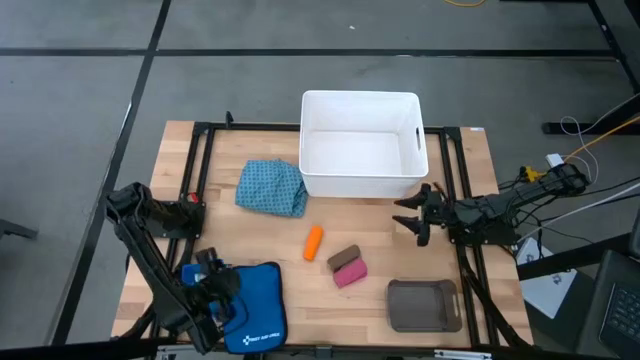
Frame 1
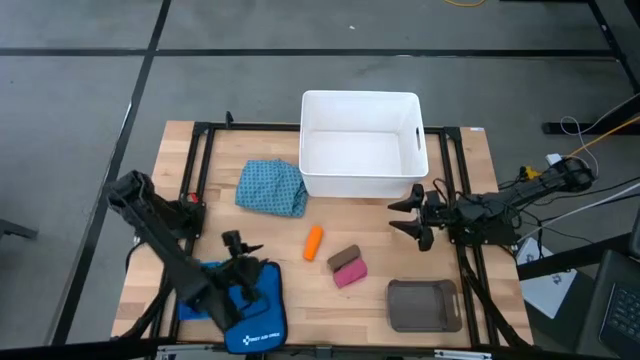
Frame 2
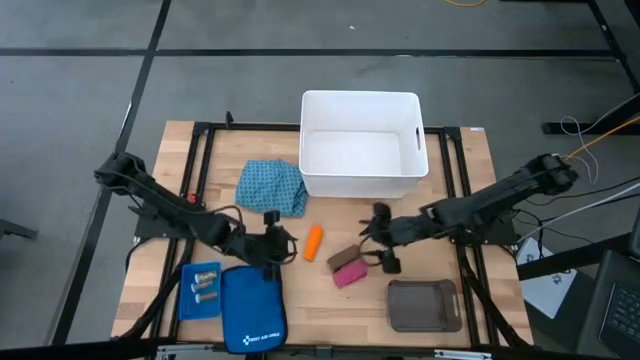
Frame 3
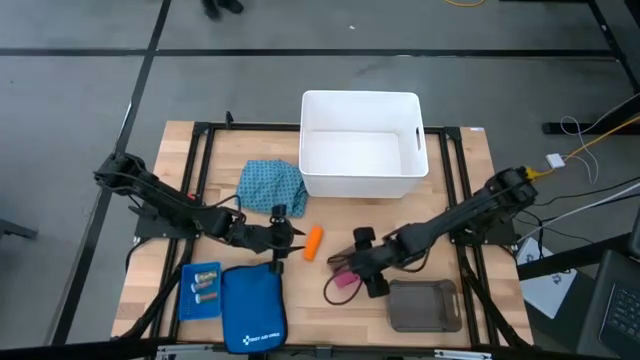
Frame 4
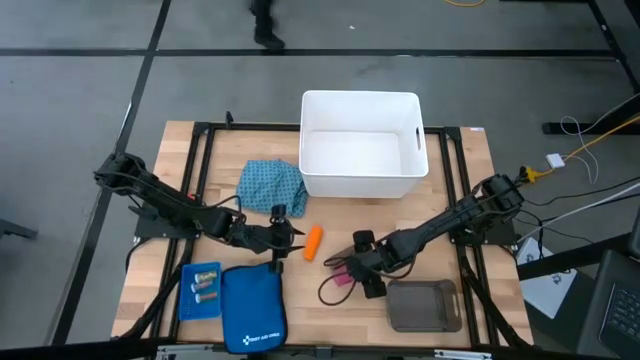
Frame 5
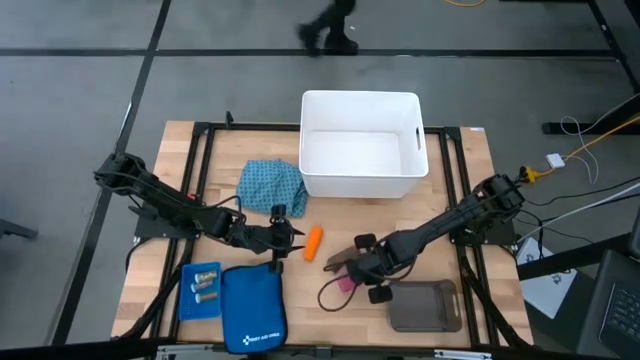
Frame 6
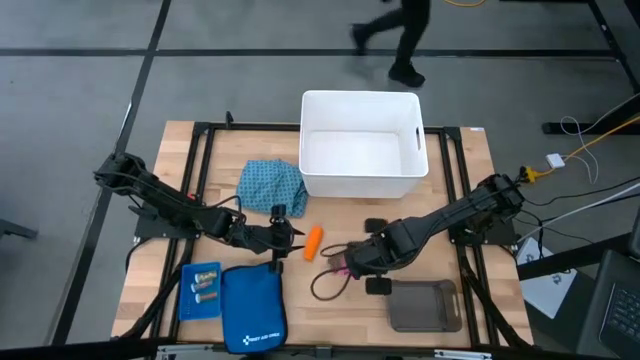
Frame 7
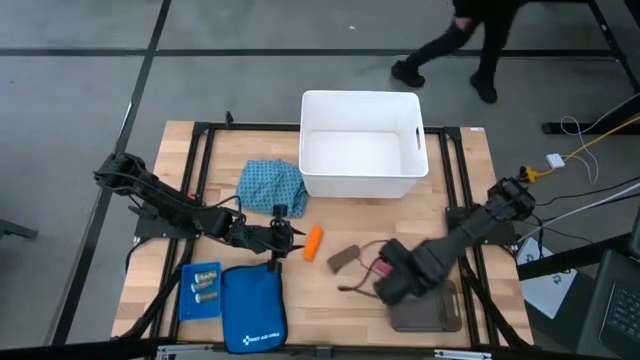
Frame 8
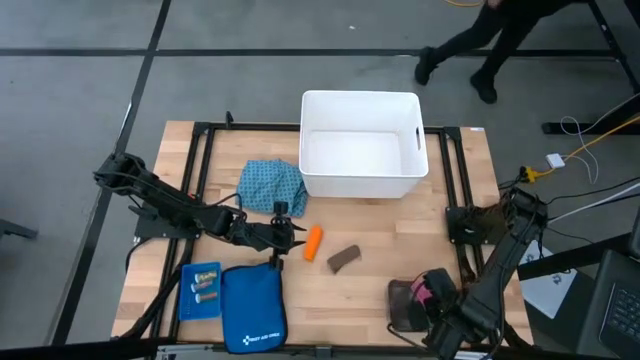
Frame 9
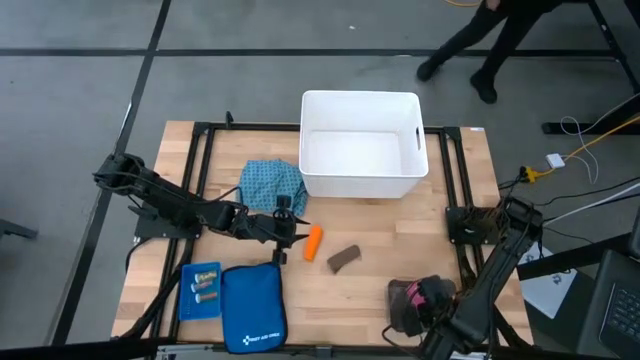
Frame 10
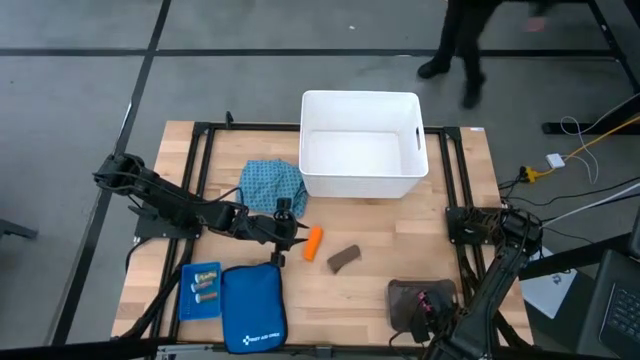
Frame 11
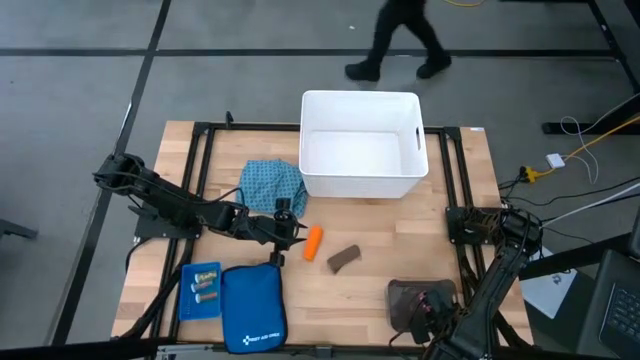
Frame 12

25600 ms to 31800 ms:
Task: Pick & place medical supplies in basket/bin
Put the pink bandage into the black bin

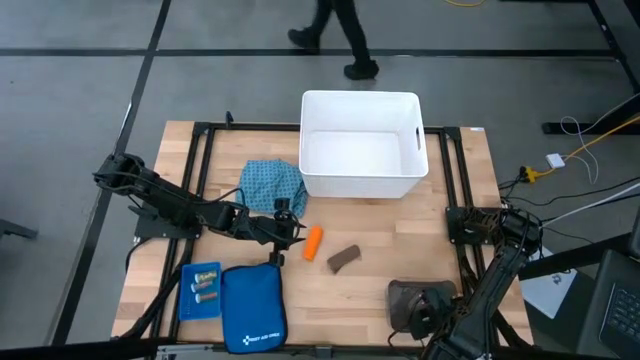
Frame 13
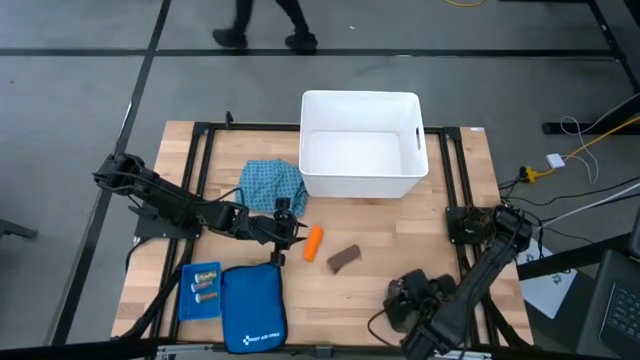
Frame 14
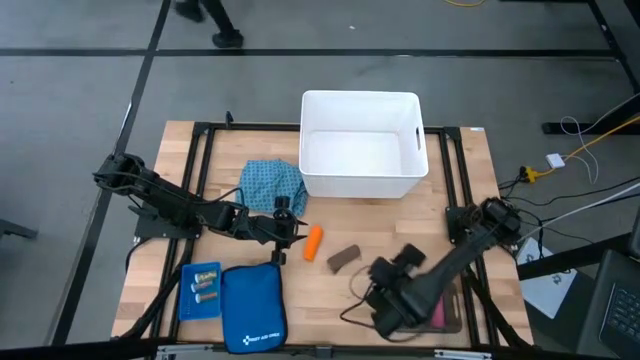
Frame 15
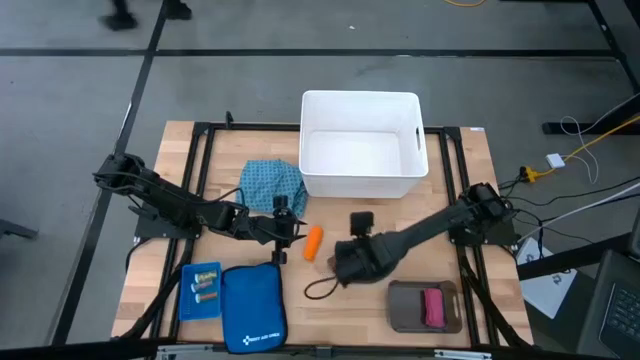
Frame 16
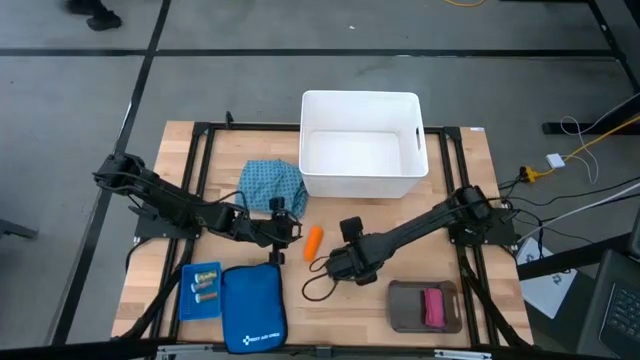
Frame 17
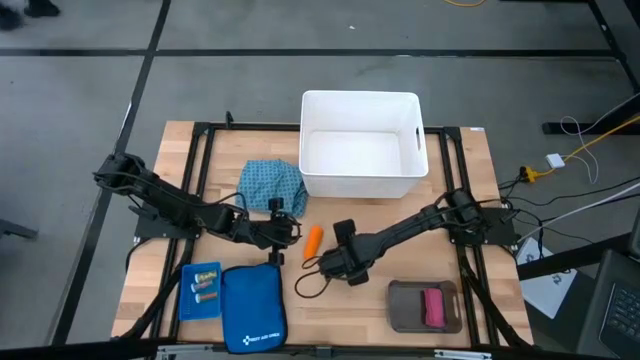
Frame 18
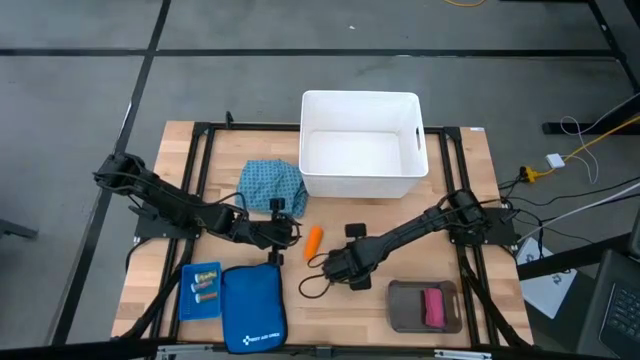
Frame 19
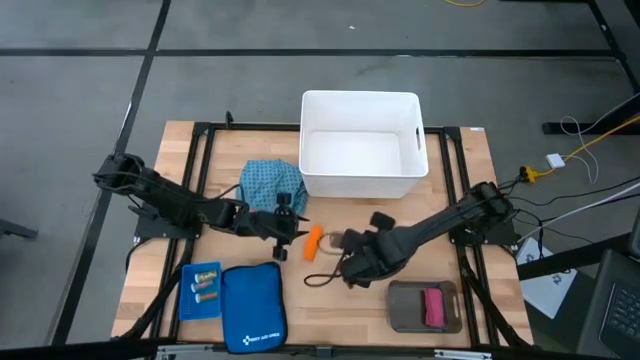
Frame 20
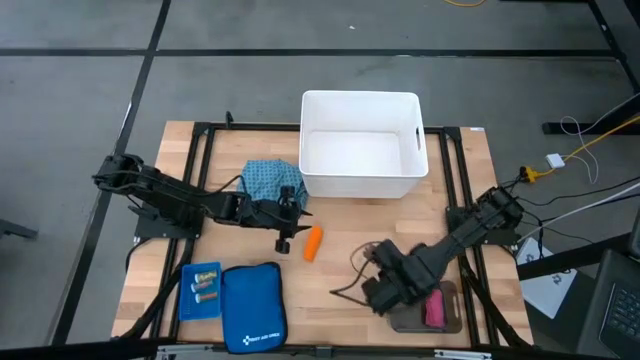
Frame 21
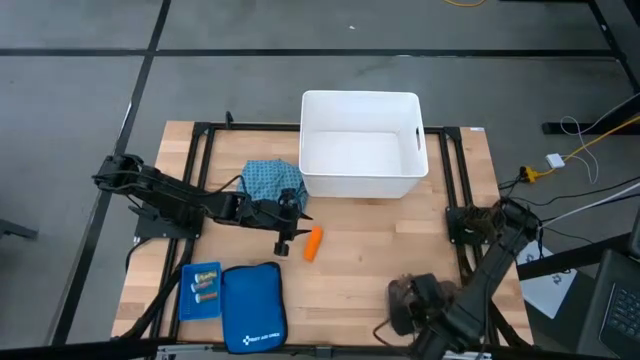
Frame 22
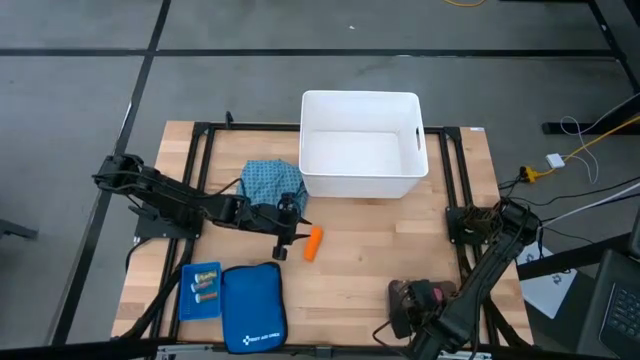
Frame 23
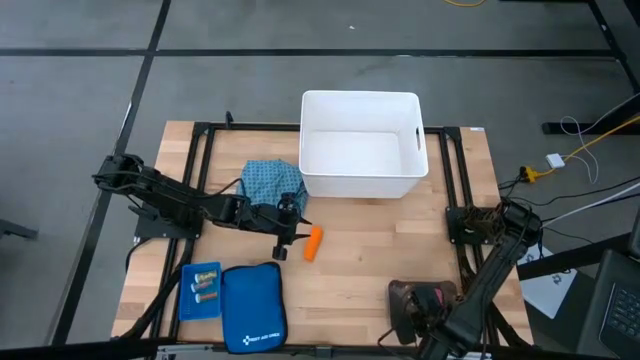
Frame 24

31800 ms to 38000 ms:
Put the brown bandage into the black bin

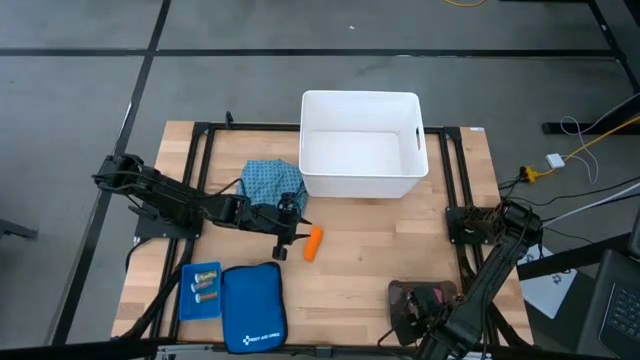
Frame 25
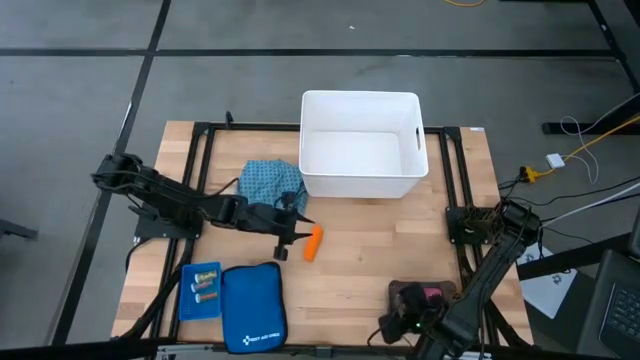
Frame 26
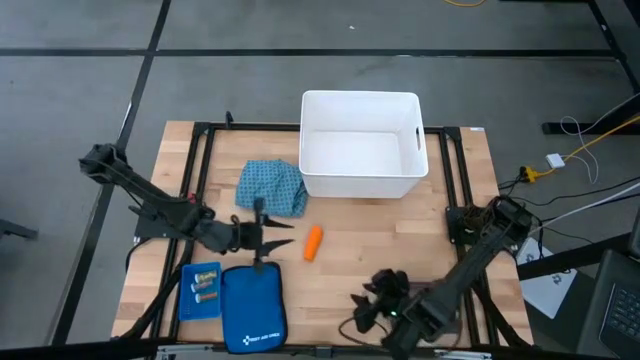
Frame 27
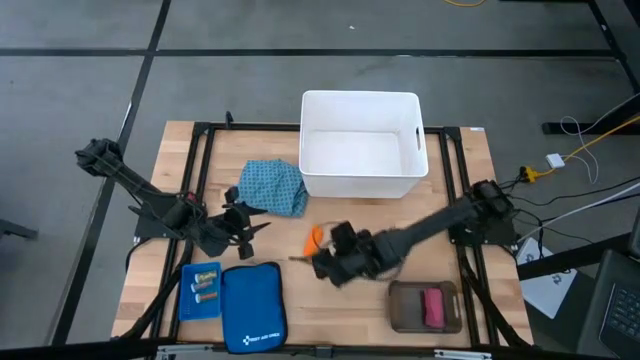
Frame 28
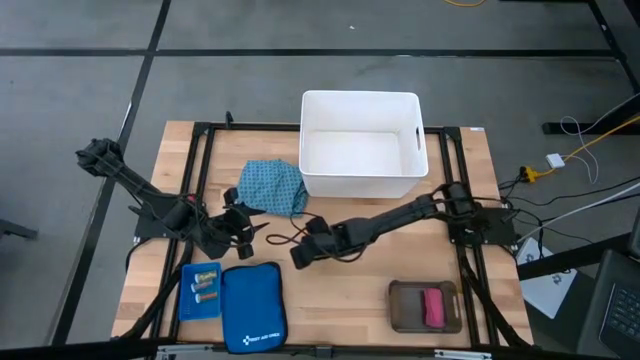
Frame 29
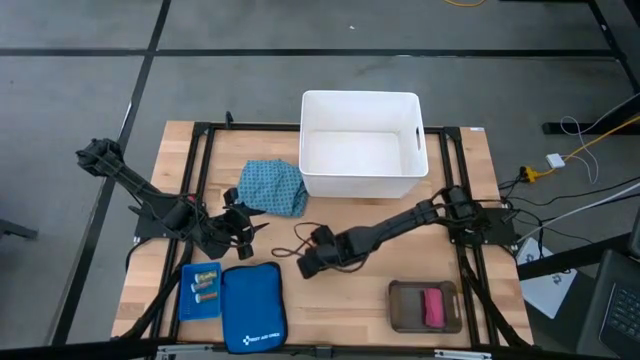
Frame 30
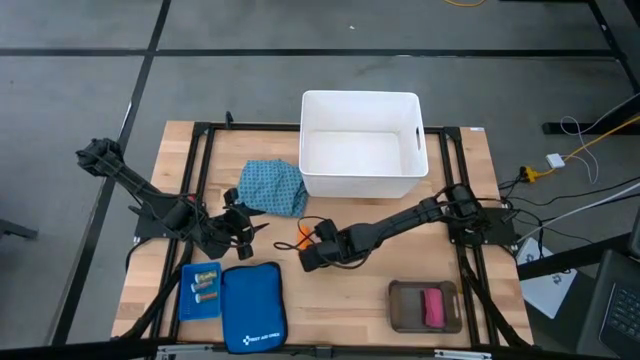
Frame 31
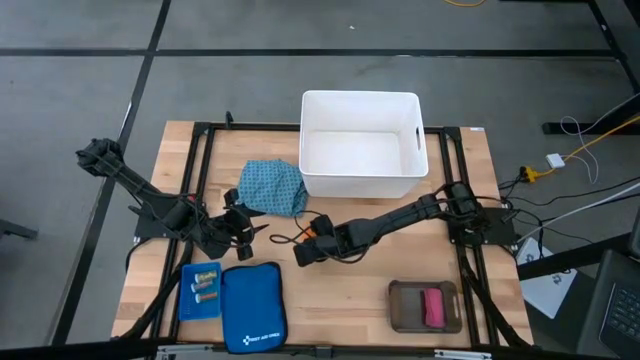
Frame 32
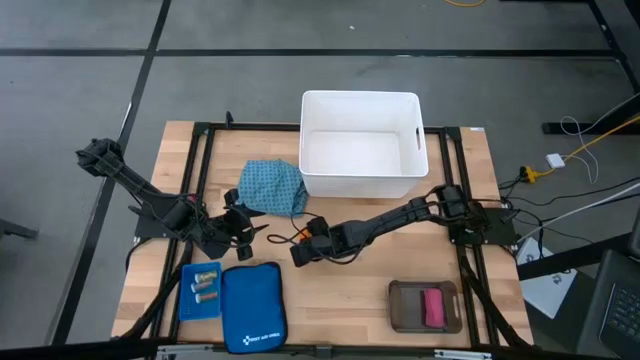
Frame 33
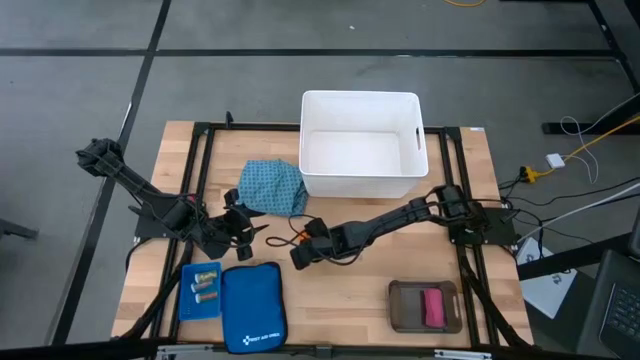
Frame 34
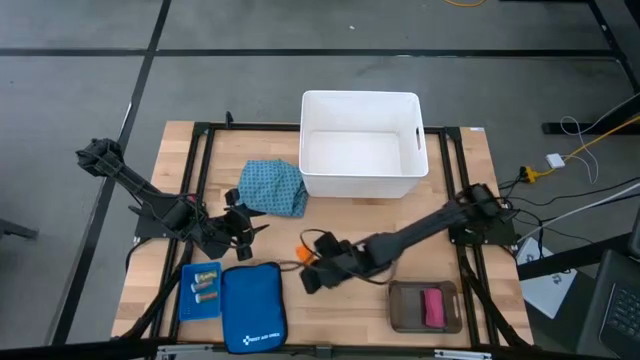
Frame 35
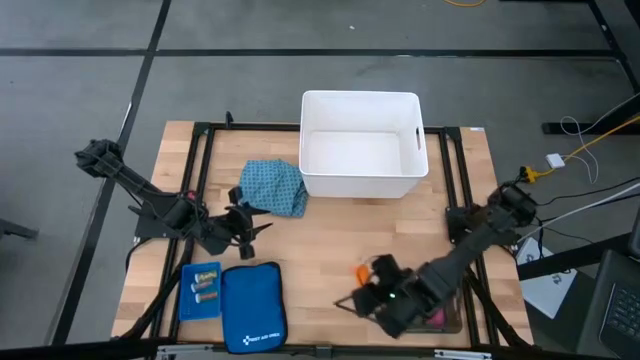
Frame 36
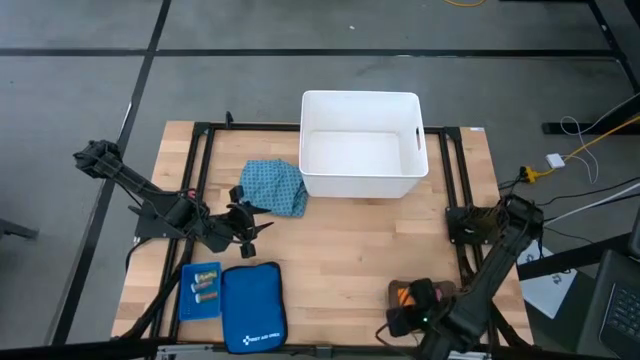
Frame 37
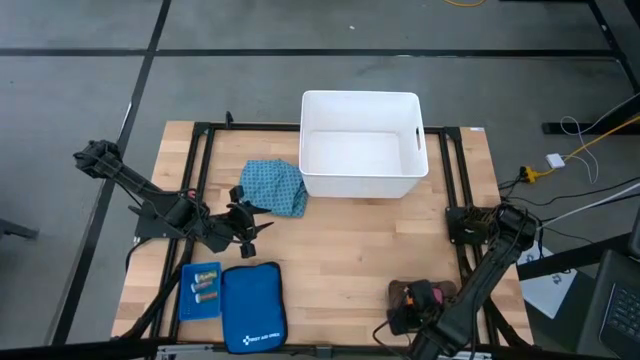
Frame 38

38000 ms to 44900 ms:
Put the orange bandage into the black bin

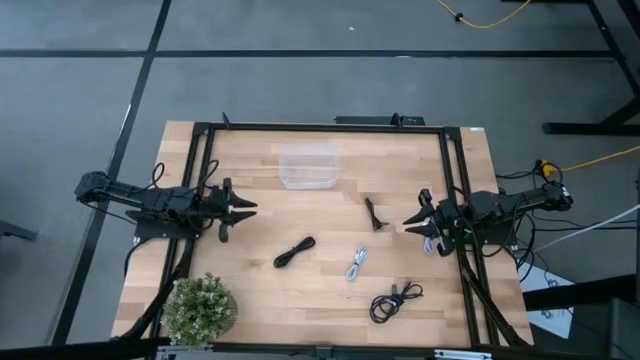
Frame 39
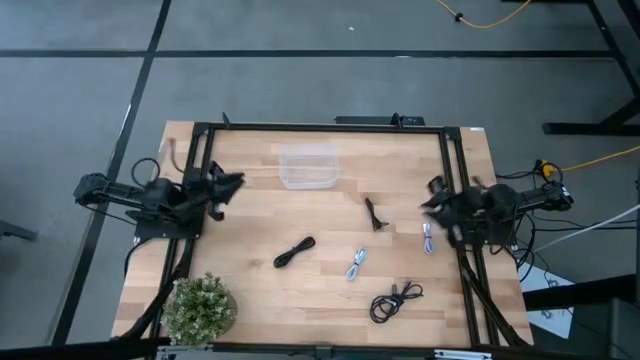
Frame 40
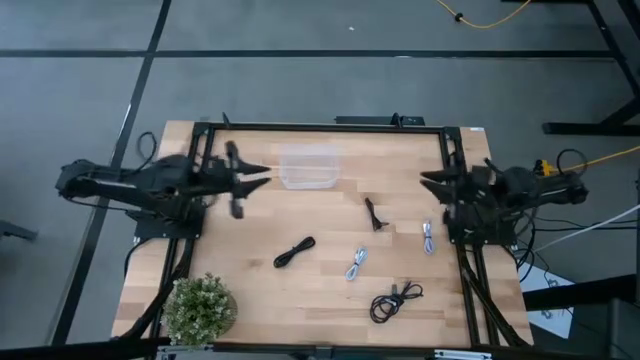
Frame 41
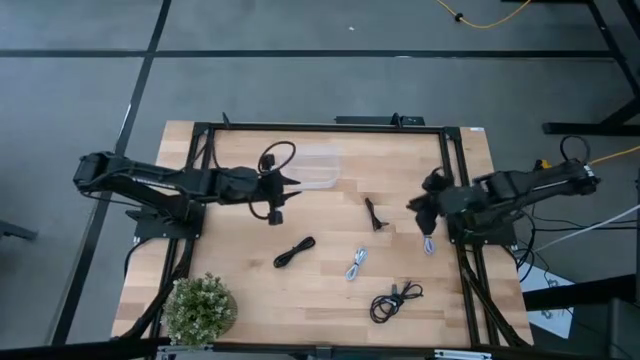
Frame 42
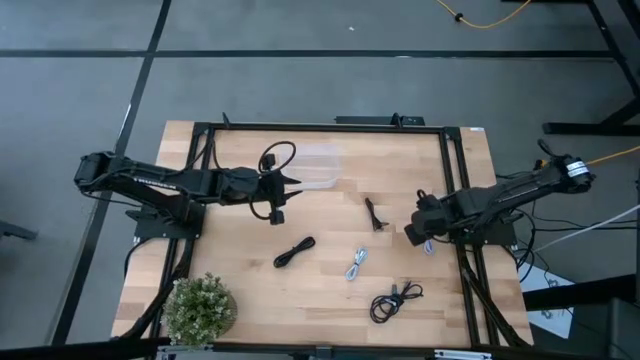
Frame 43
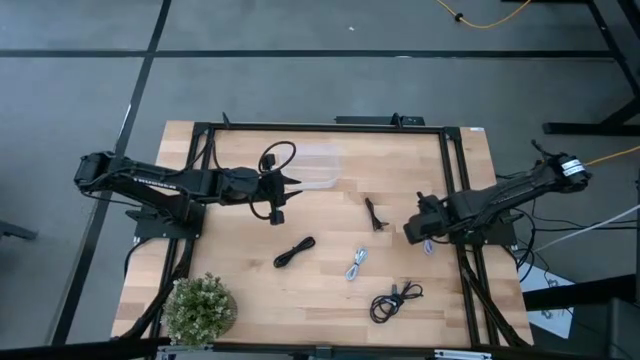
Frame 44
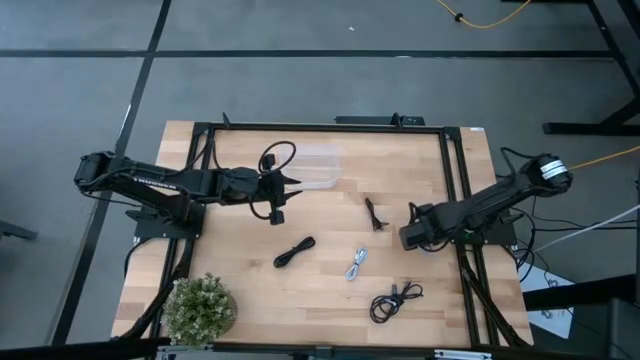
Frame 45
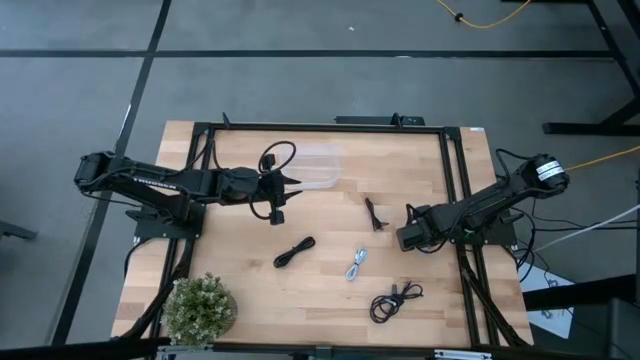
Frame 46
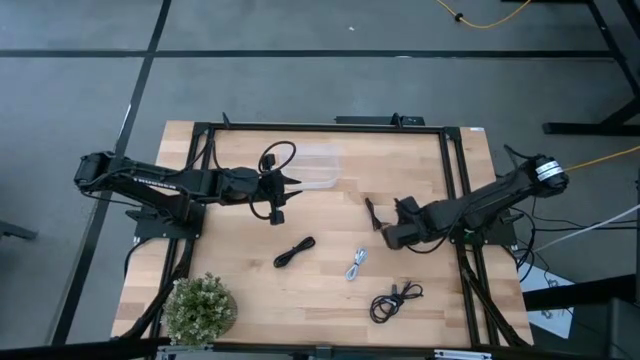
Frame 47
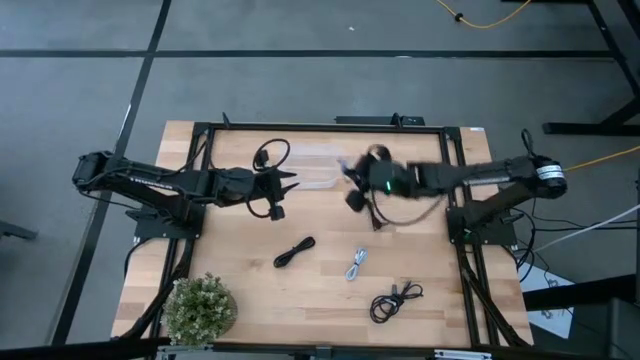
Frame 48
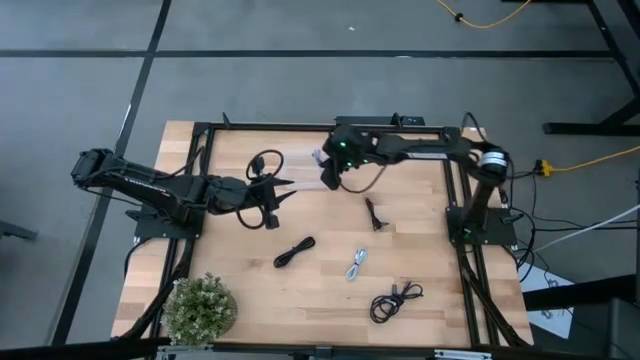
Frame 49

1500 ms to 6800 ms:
Task: Pick and place USB-C Cables
Put the purple charger cable into the transparent bin
